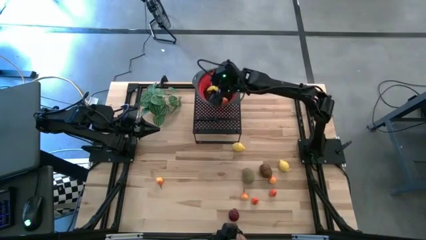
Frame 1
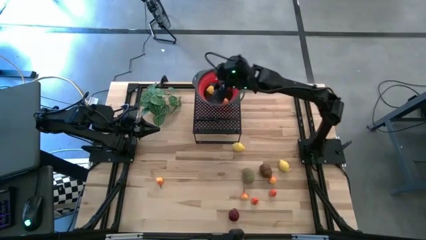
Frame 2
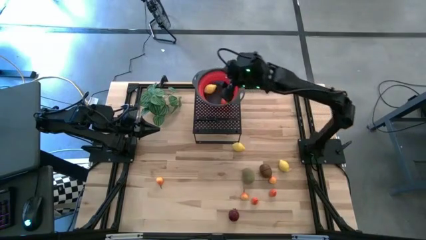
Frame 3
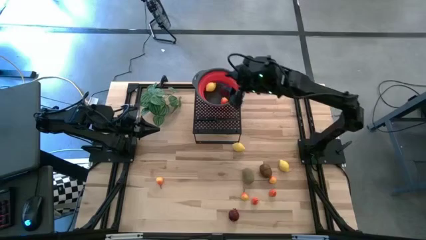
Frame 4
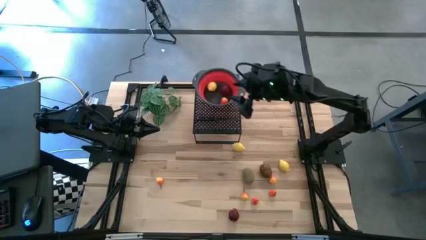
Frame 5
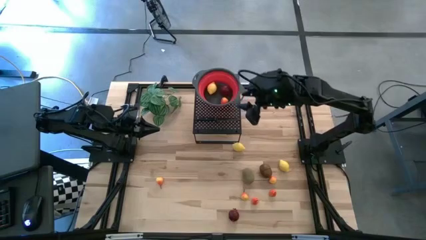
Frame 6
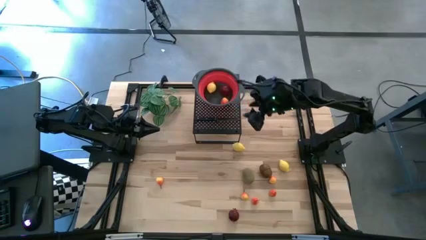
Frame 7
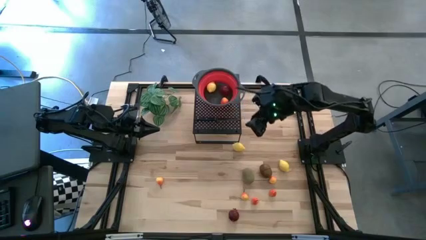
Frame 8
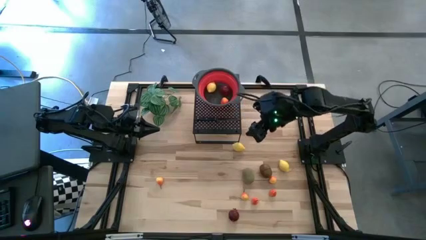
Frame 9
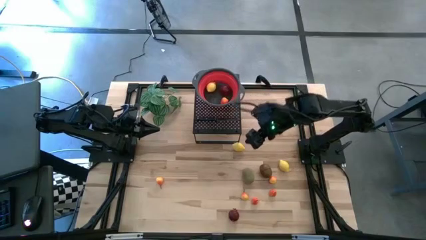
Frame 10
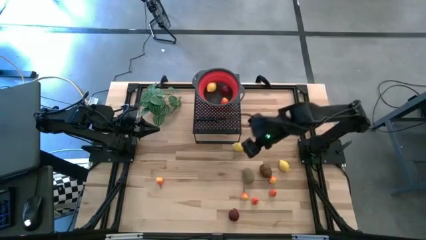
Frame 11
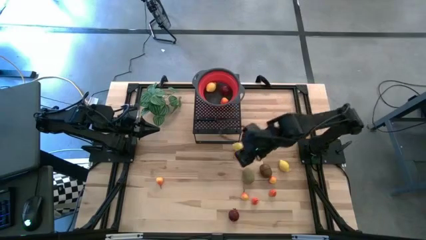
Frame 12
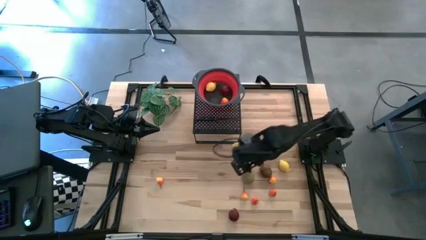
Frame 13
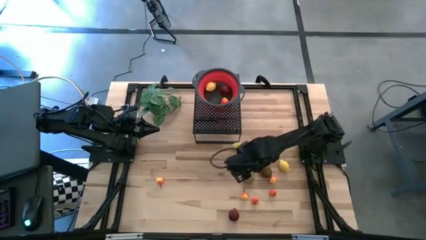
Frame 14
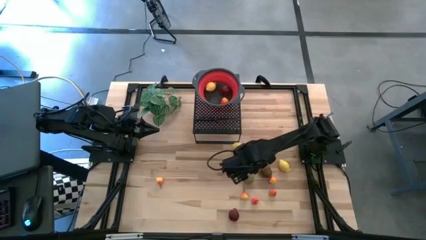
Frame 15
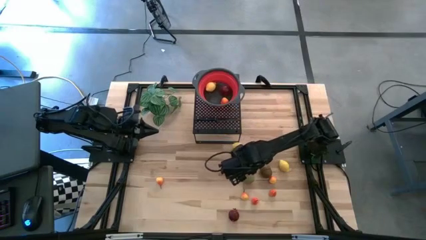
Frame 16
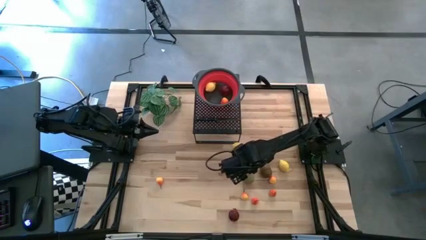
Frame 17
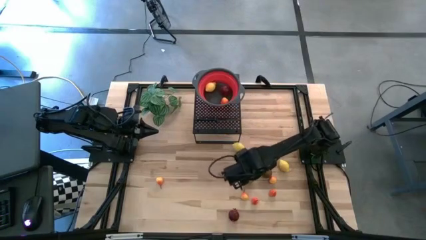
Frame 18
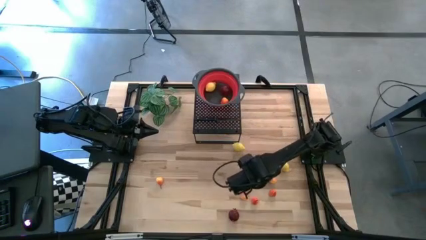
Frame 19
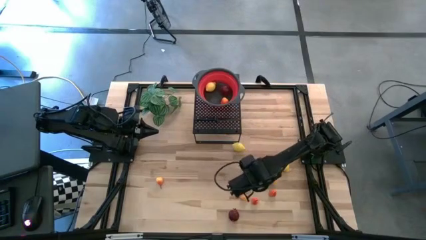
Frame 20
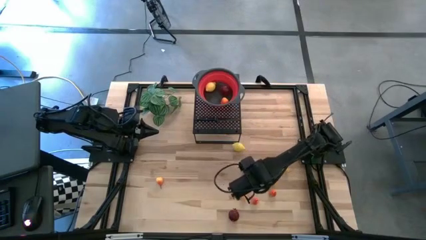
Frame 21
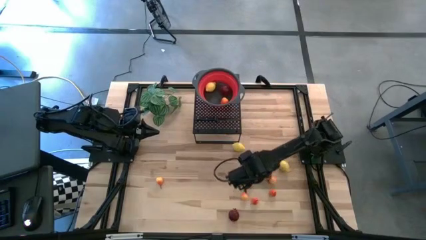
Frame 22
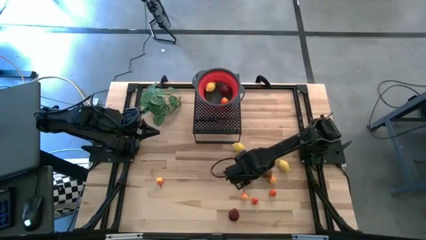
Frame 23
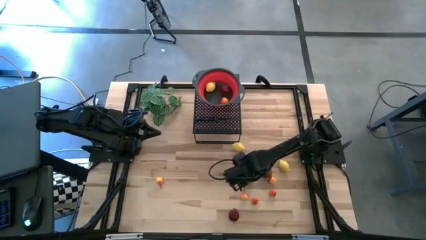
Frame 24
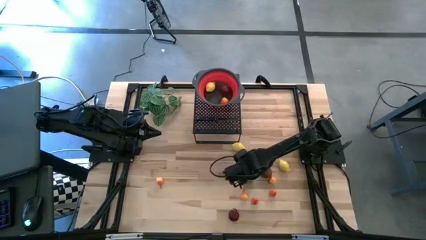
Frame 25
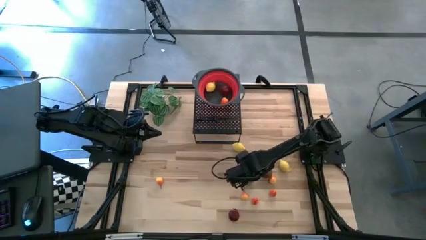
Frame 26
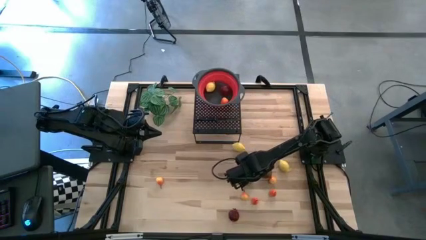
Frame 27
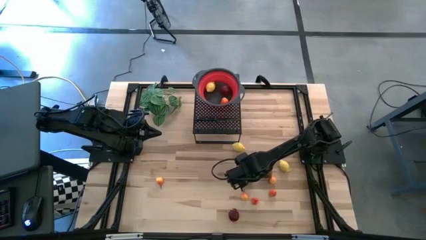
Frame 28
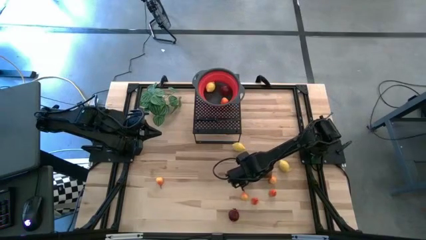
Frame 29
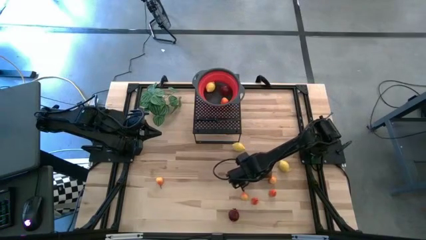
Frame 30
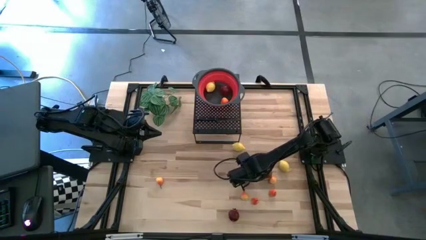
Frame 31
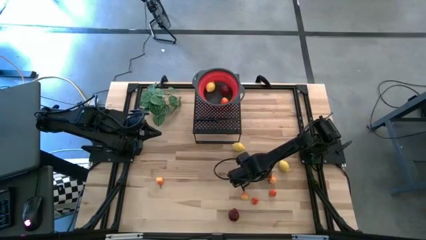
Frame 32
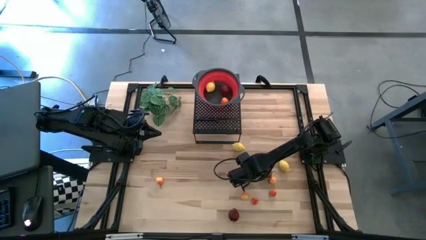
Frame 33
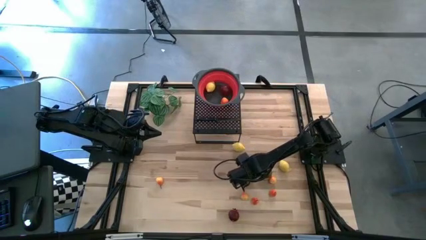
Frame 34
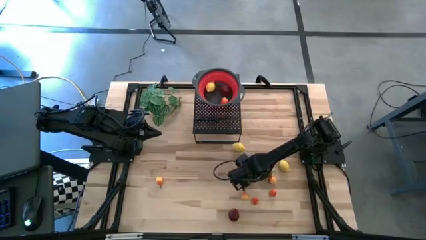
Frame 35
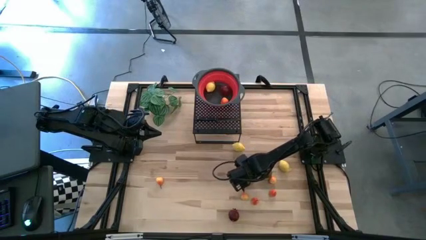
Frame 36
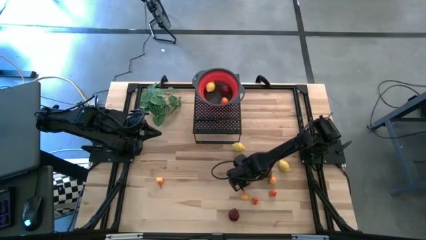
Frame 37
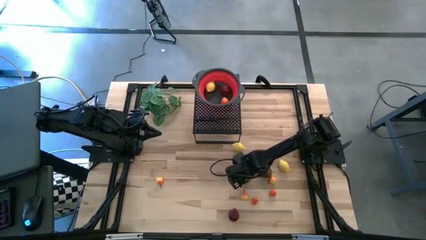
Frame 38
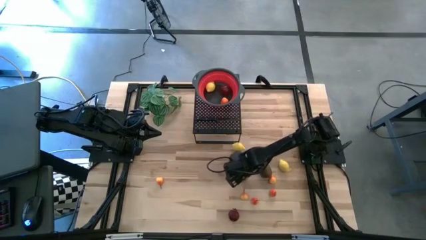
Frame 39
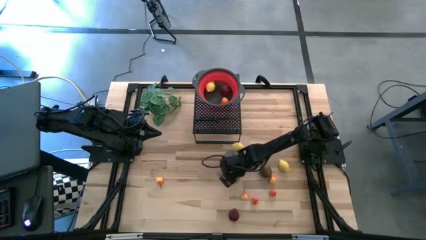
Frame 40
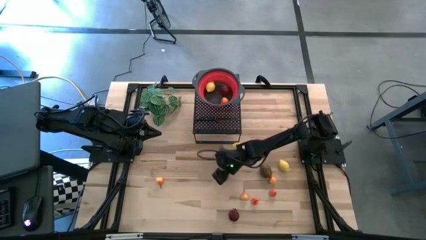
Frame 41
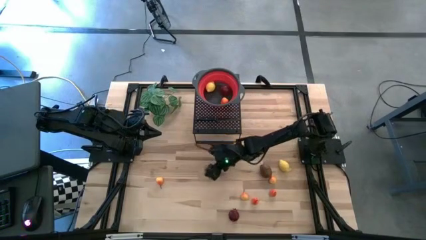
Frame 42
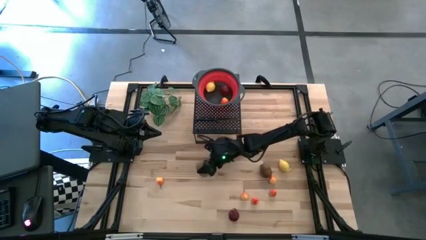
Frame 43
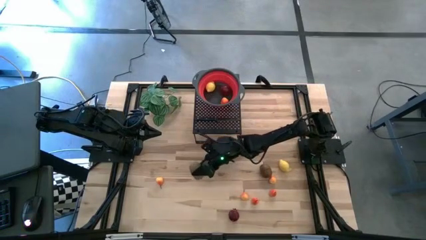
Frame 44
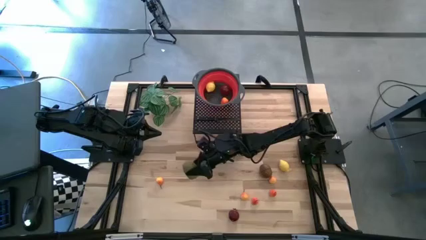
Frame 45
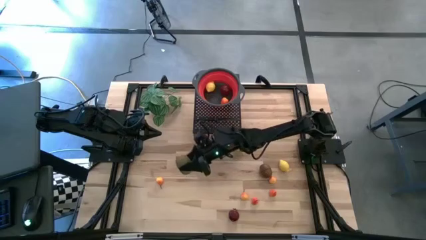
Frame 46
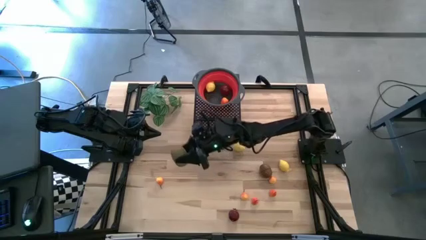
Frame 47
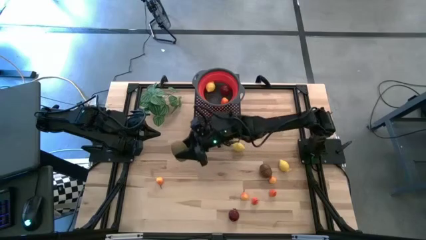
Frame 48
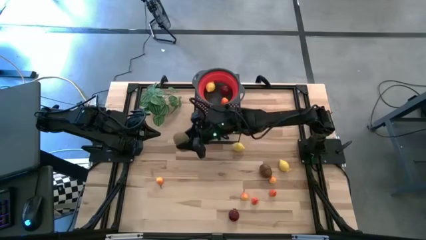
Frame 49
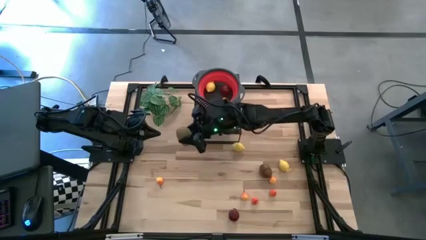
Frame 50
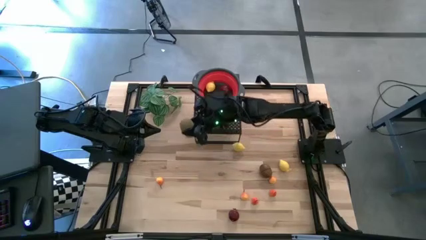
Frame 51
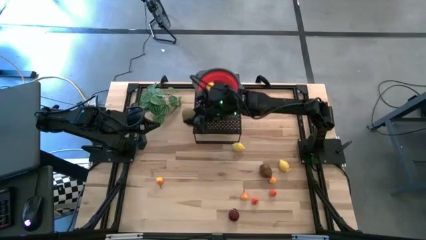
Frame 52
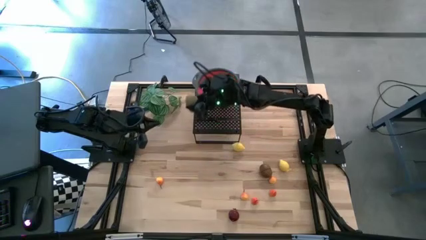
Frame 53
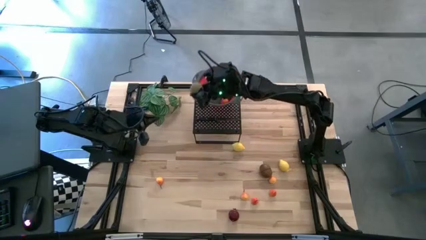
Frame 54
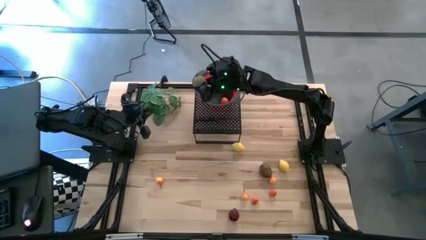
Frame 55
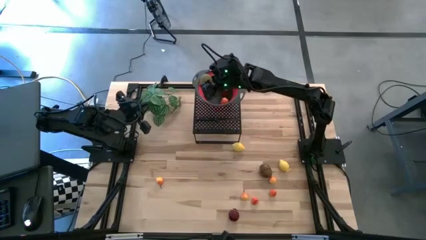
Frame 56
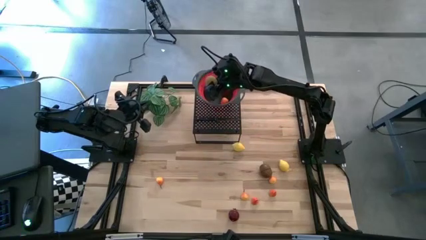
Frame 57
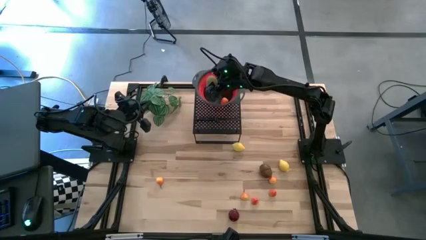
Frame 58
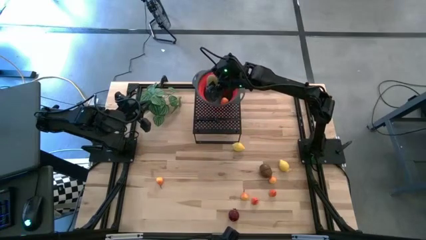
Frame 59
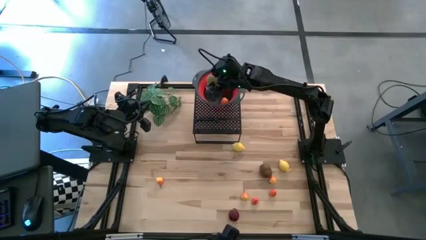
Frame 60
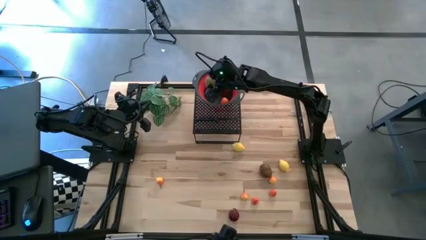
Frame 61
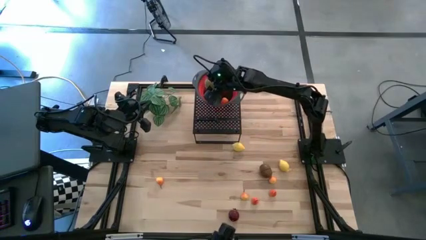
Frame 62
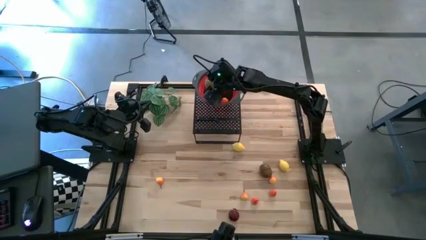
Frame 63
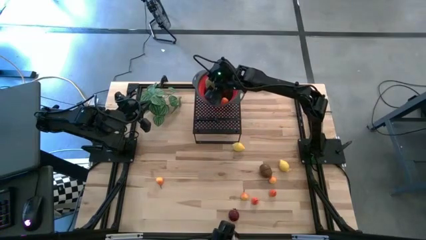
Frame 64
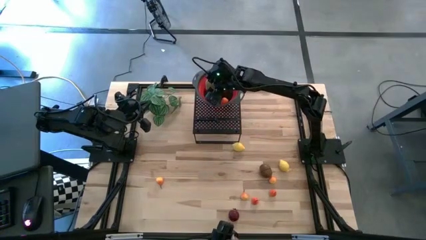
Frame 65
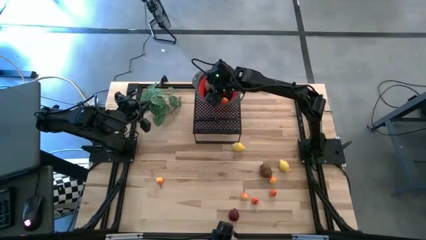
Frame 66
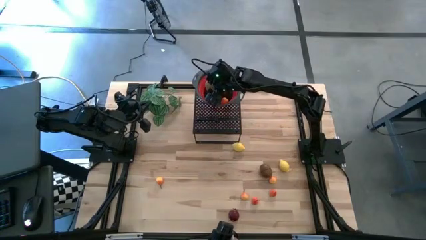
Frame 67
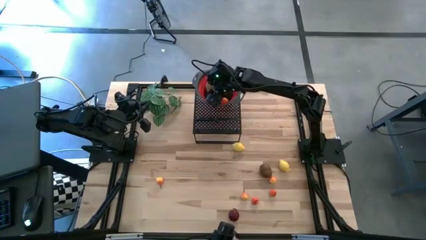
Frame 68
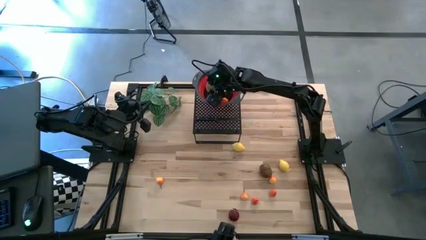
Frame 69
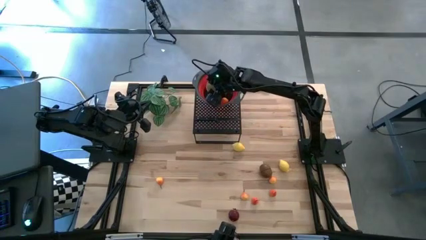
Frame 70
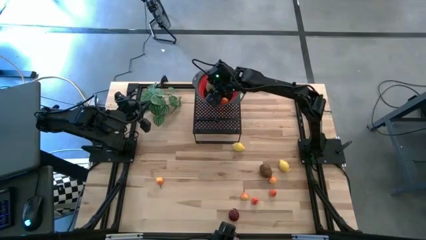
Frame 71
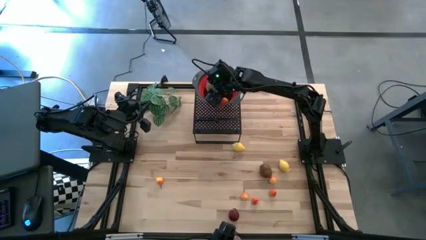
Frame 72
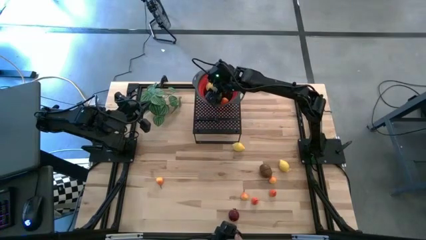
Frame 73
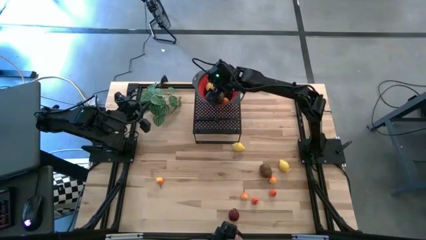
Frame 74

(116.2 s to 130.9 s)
Task: Pick & Place Fruit
Put the left kiwi into the red strainer bowl
